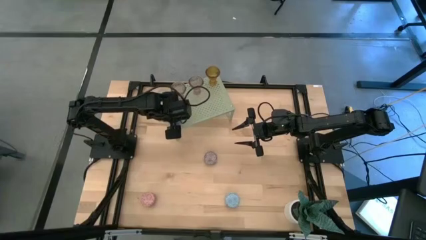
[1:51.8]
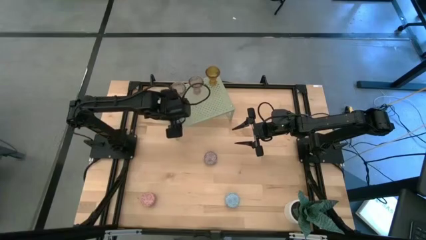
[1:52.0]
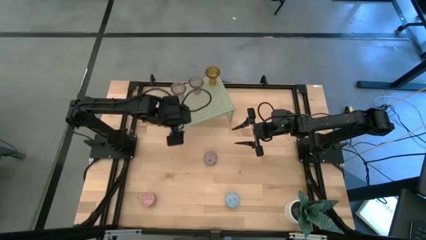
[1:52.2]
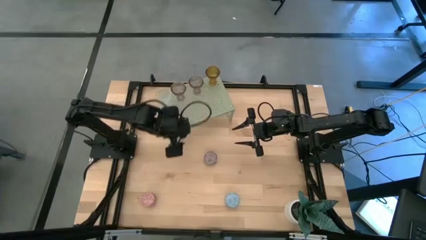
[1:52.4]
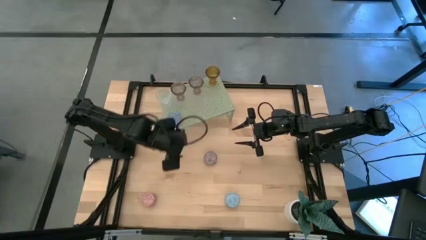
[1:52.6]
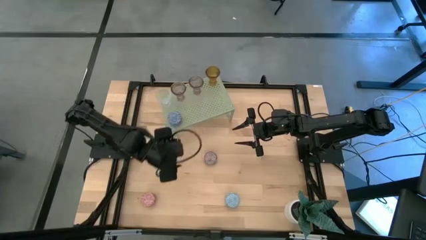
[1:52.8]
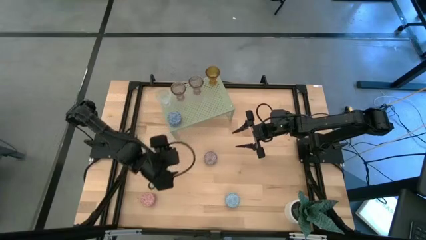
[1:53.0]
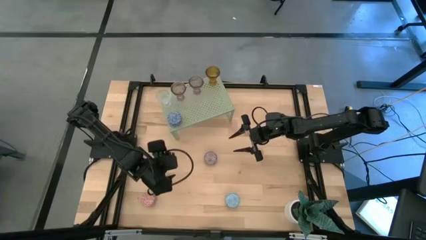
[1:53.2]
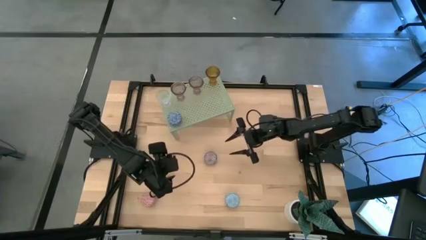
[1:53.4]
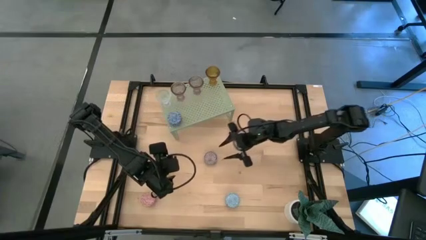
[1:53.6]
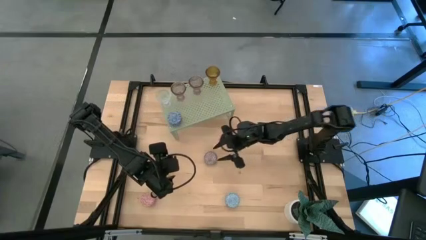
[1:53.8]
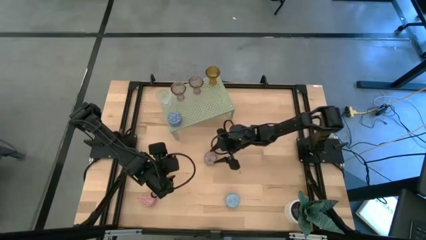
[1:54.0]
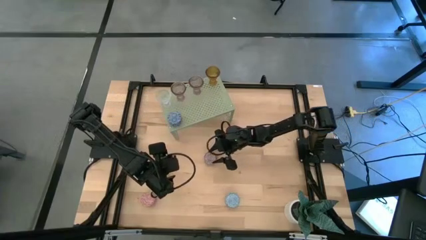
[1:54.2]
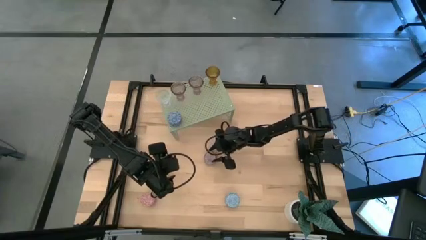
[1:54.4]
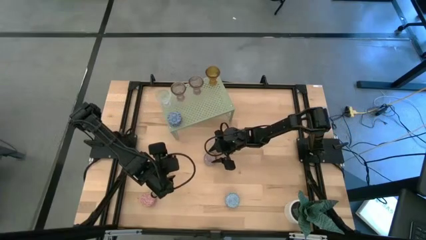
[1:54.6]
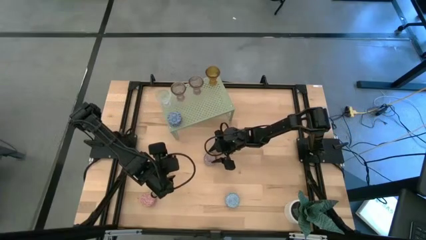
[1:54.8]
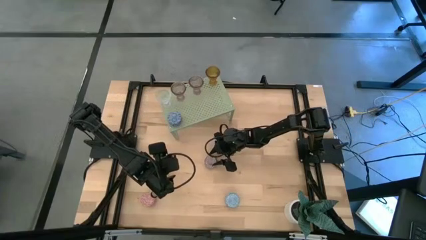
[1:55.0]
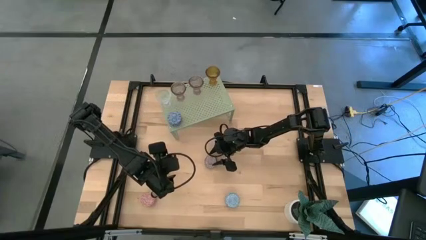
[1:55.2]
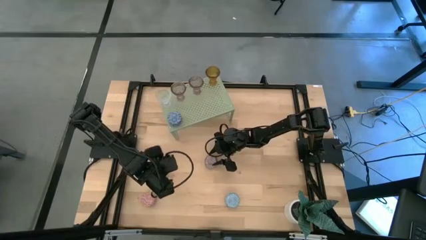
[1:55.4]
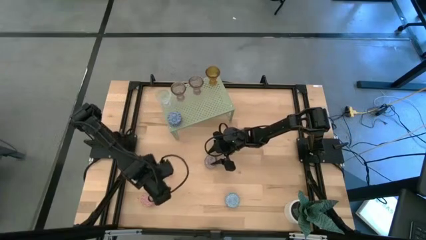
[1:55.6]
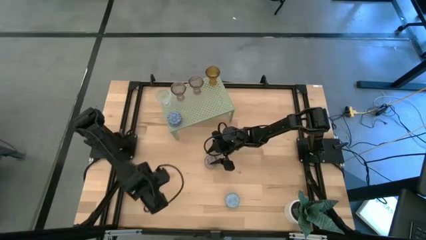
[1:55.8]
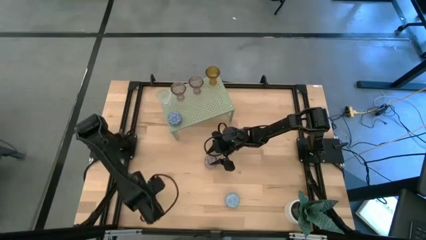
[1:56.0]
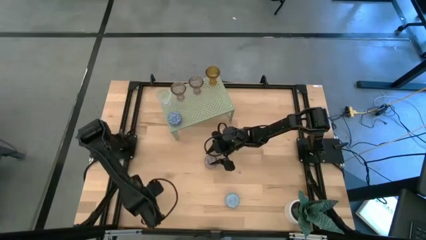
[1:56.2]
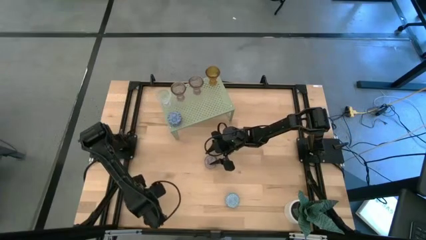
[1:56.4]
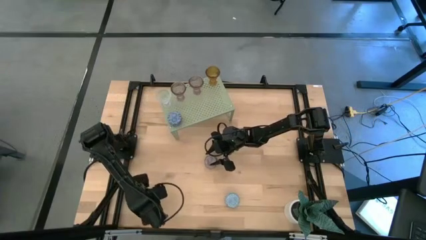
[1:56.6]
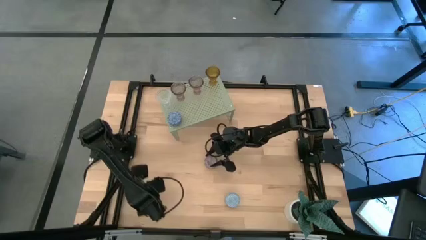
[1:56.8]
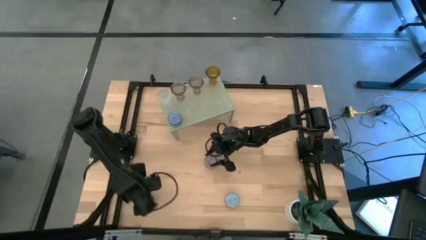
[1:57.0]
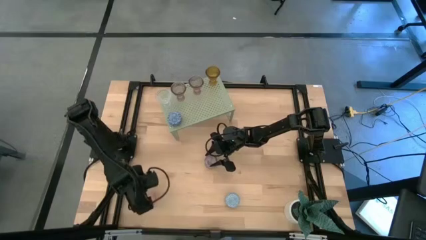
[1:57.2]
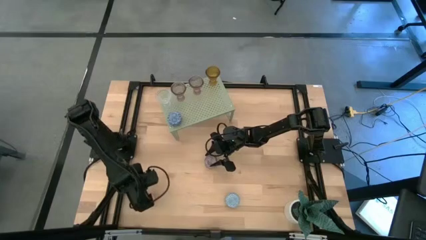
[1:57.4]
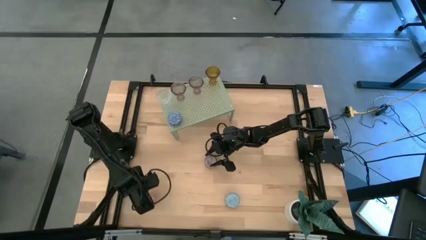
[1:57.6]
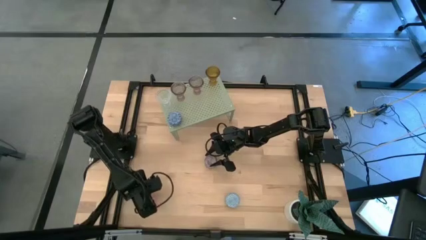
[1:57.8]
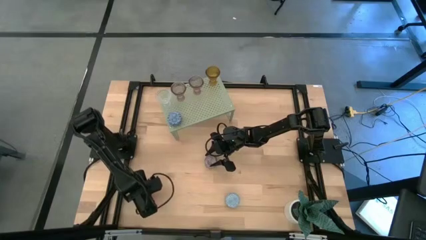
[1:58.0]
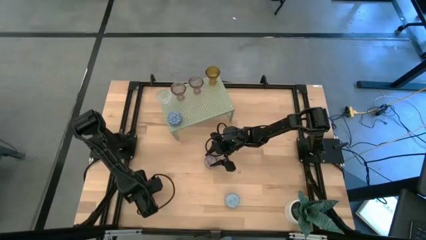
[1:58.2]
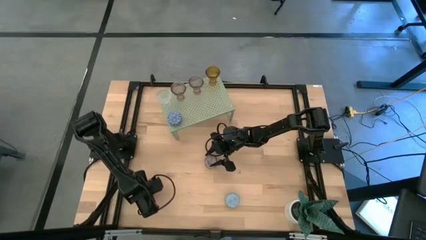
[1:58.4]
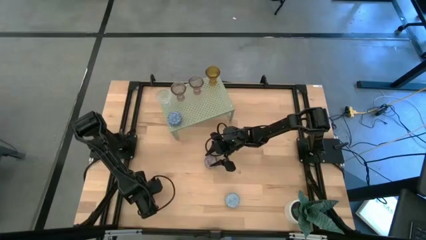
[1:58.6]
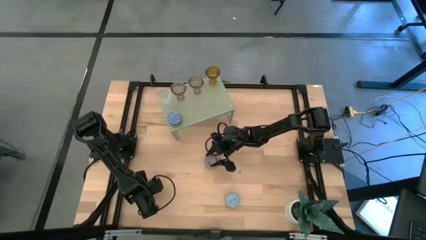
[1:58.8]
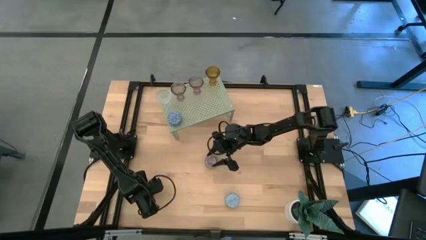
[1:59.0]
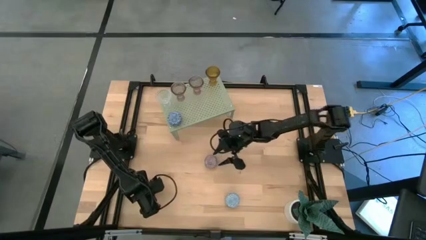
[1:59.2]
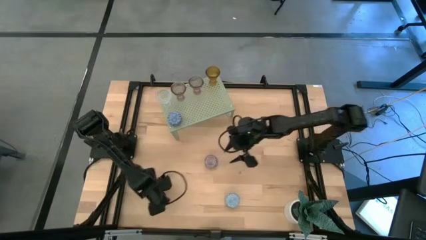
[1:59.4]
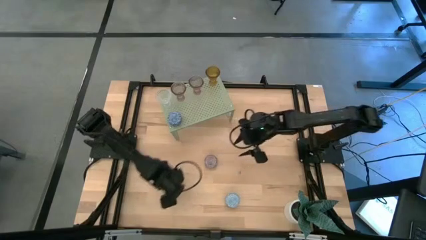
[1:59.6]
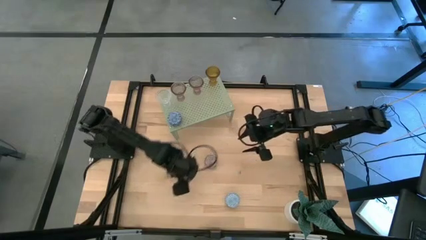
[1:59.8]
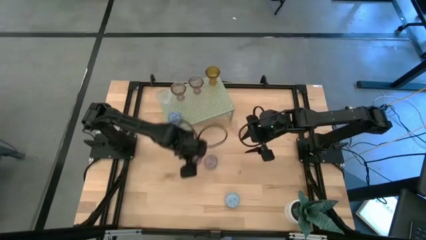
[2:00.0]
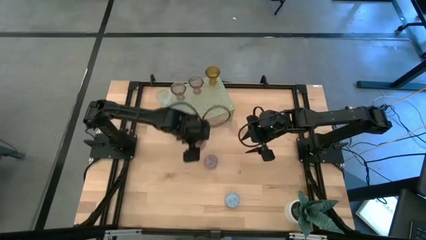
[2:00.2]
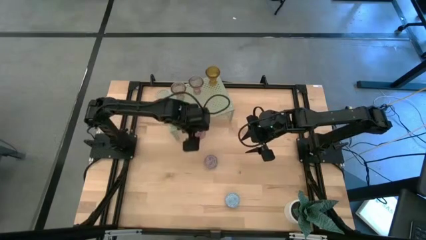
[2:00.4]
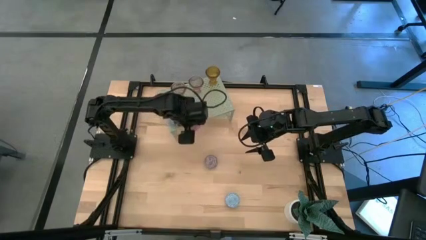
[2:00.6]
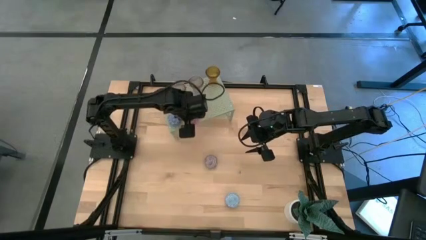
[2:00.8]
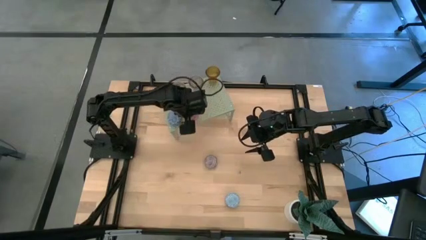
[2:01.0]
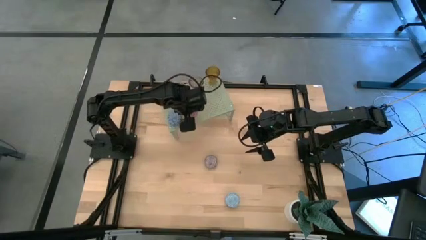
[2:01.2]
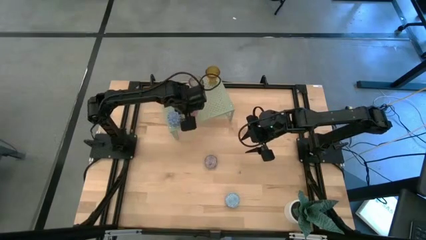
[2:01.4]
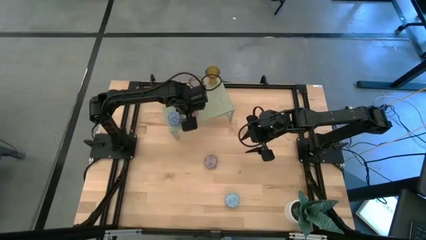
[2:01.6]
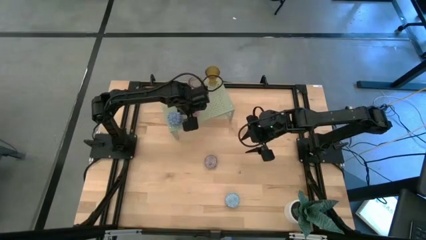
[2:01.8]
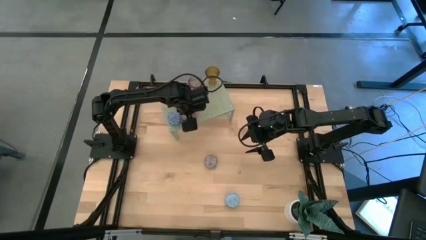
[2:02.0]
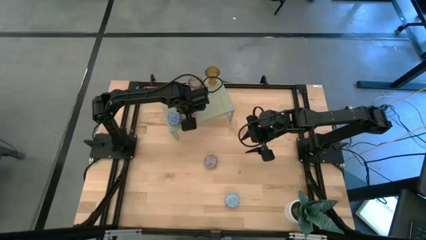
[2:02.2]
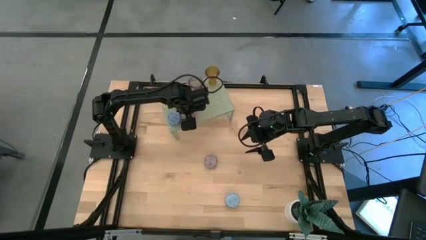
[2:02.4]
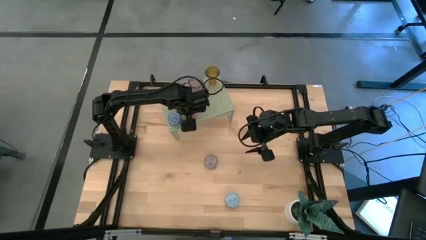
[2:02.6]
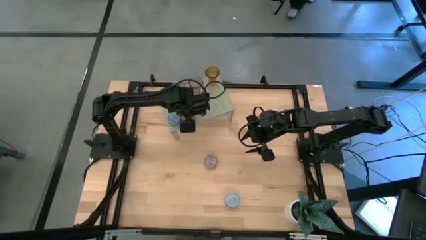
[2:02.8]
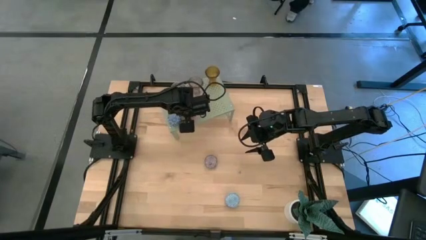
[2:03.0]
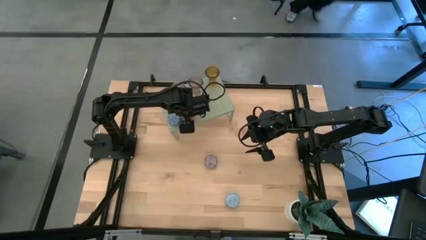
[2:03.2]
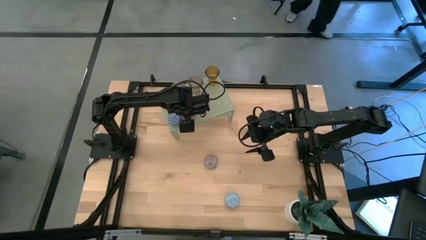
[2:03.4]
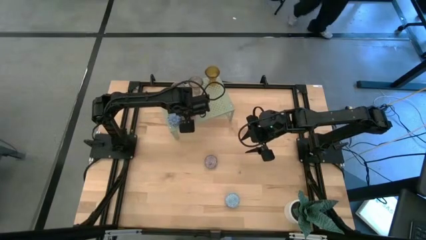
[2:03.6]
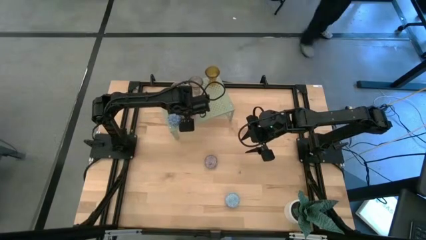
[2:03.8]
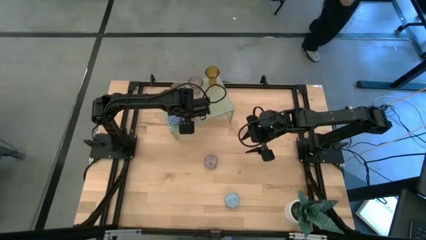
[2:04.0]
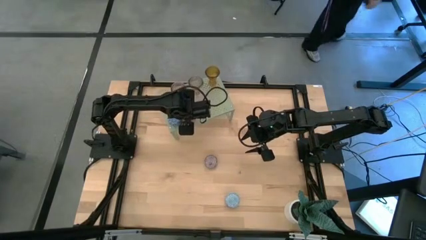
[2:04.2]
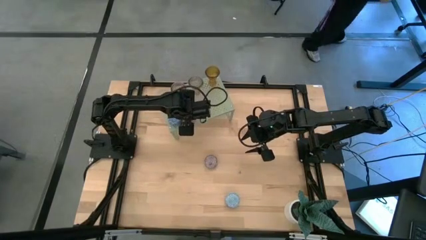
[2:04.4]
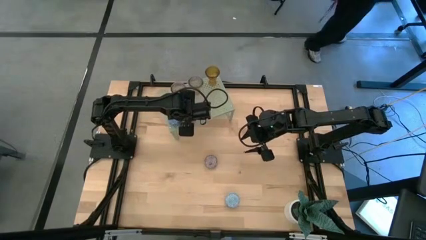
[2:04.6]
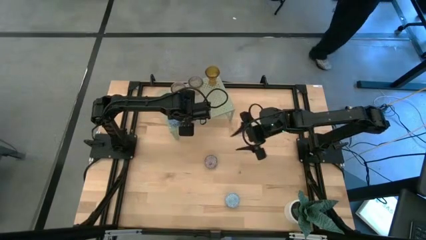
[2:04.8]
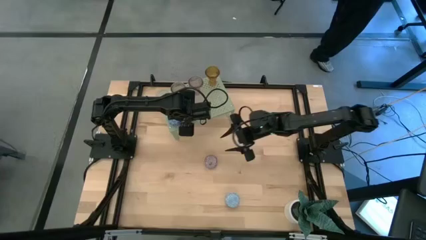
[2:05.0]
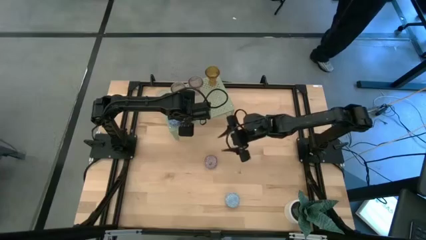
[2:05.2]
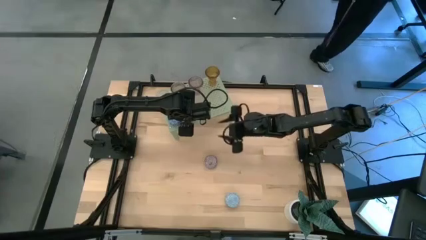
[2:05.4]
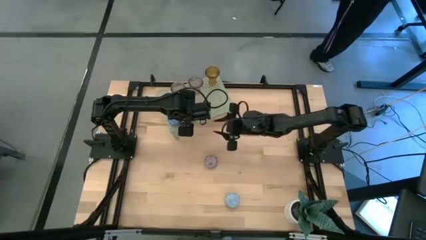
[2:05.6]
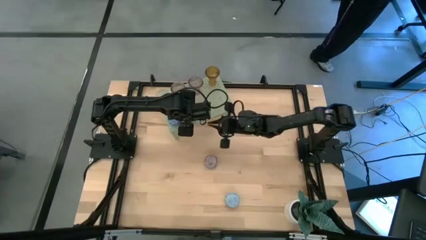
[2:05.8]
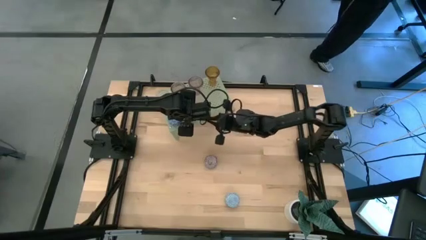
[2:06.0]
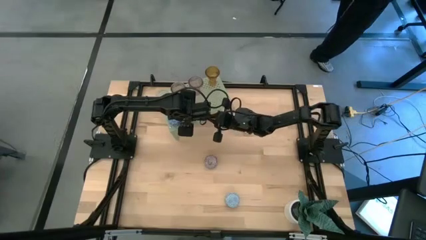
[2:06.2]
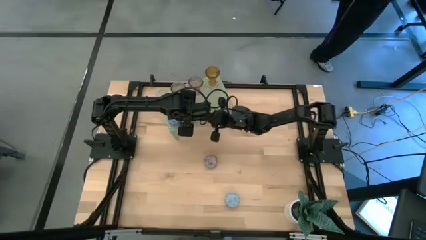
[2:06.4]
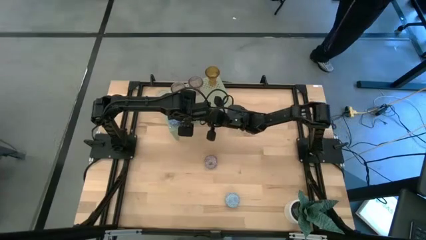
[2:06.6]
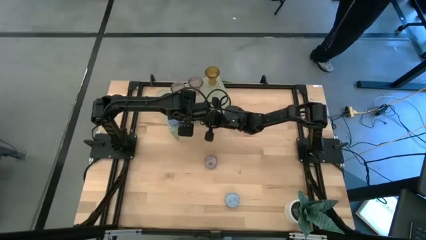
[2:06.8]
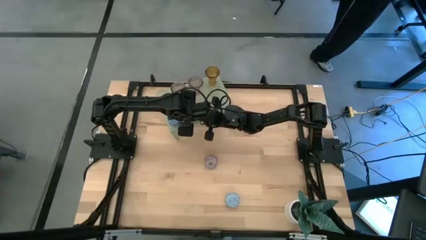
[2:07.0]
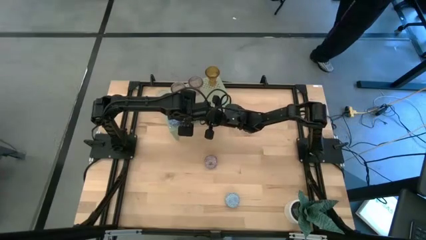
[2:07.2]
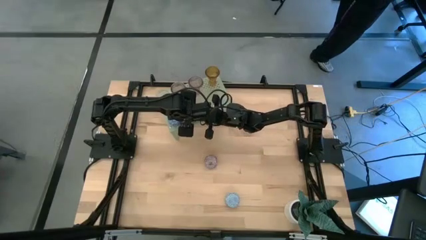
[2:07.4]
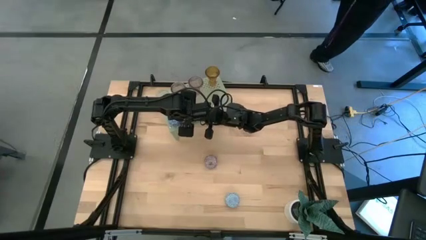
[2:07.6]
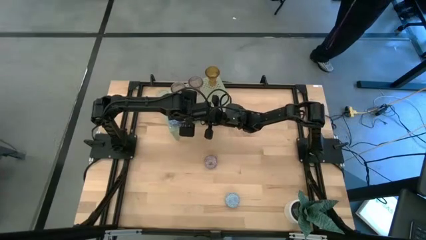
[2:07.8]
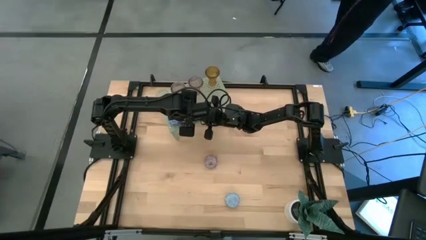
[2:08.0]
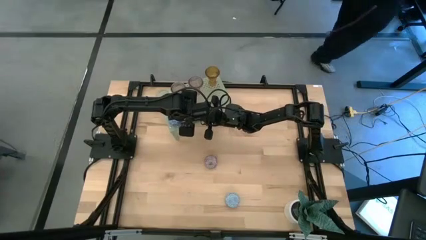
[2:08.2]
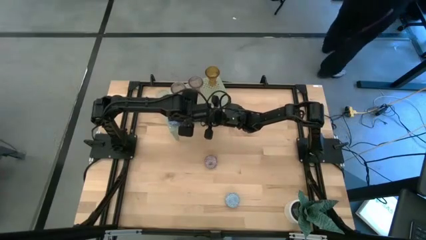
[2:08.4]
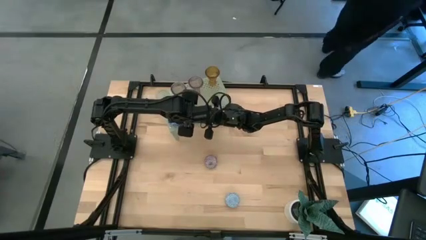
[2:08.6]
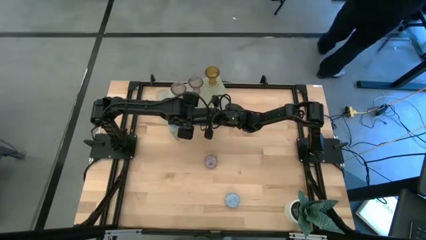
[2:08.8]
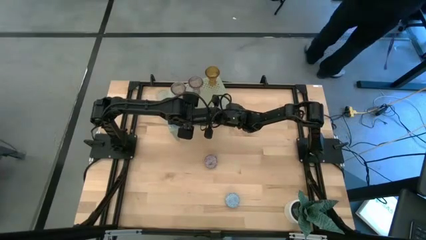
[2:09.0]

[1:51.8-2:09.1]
Task: Pick & Place candle stick holders
Put the pink scented candle on the shelf aligned with the other scented candle
